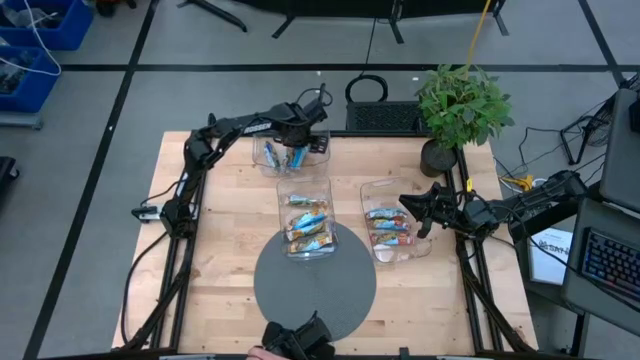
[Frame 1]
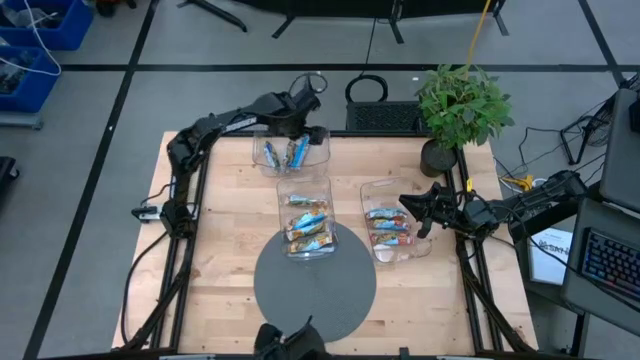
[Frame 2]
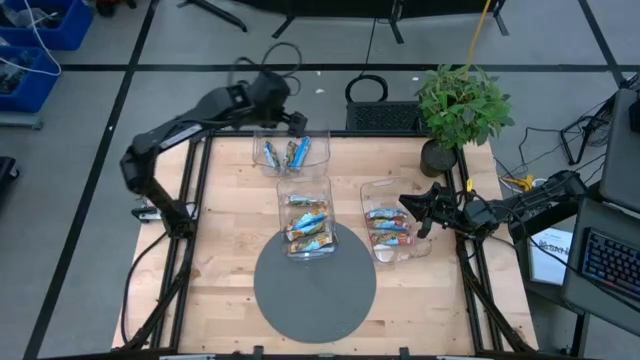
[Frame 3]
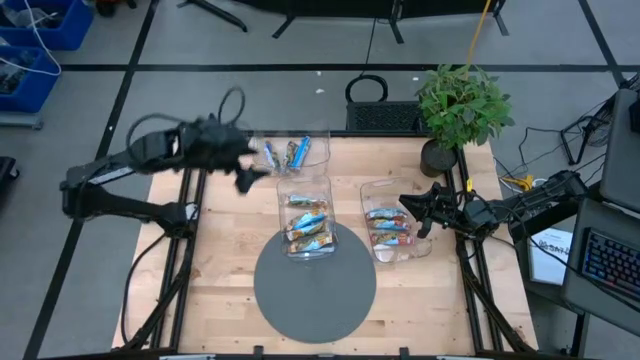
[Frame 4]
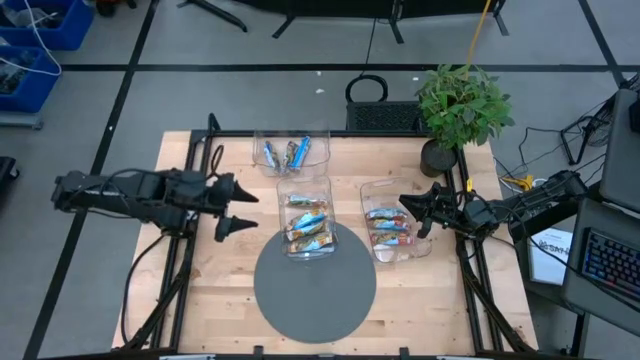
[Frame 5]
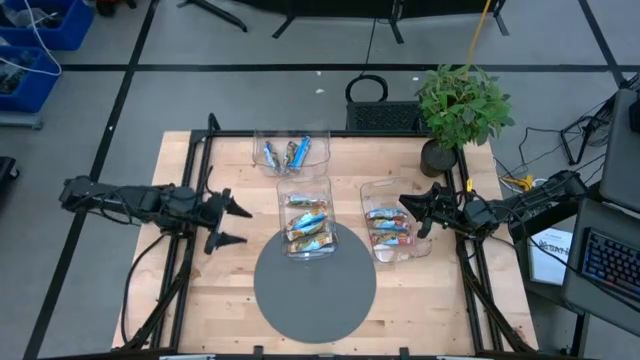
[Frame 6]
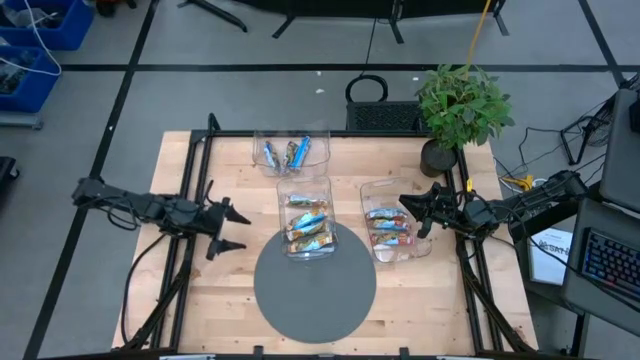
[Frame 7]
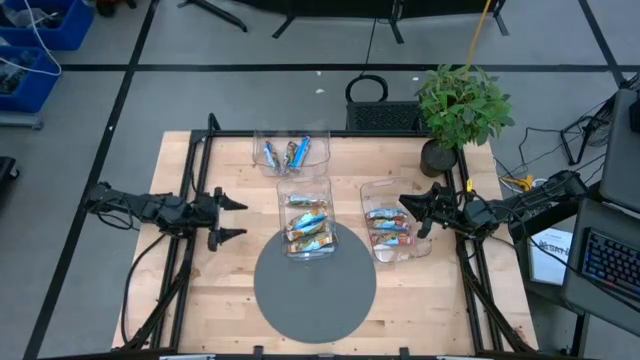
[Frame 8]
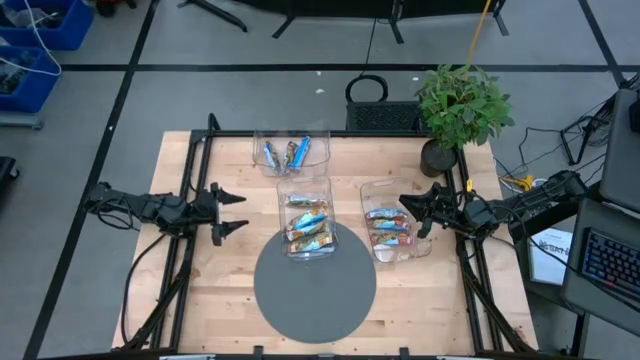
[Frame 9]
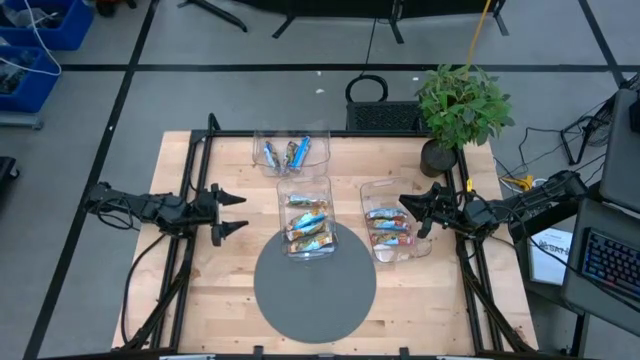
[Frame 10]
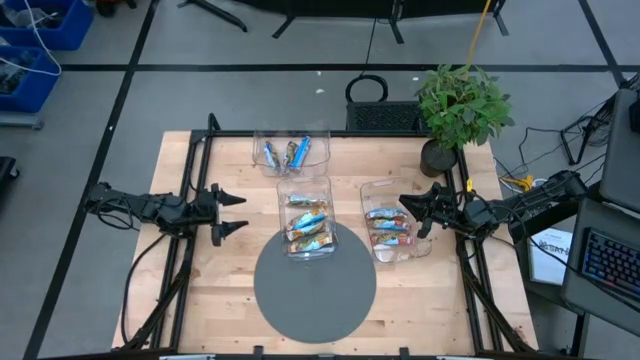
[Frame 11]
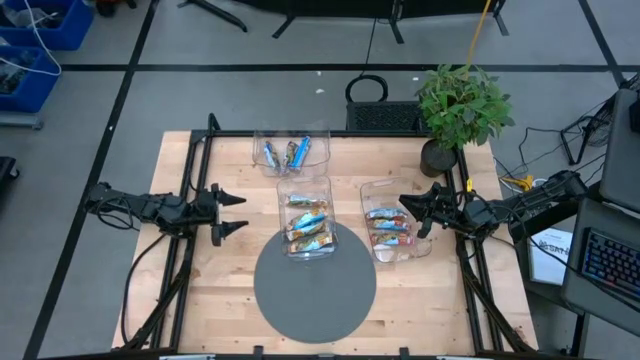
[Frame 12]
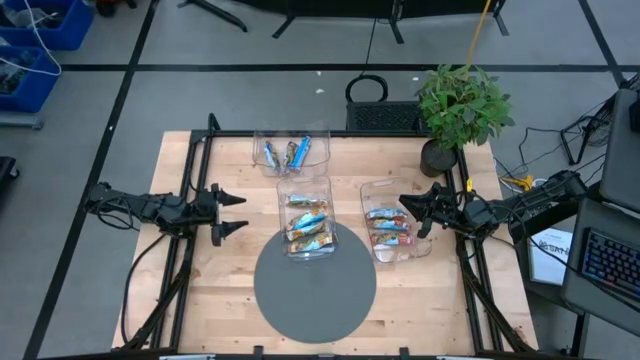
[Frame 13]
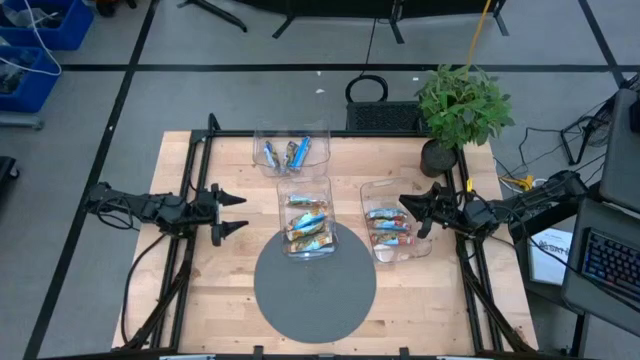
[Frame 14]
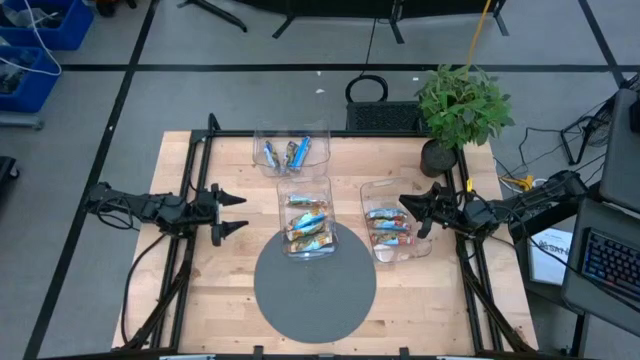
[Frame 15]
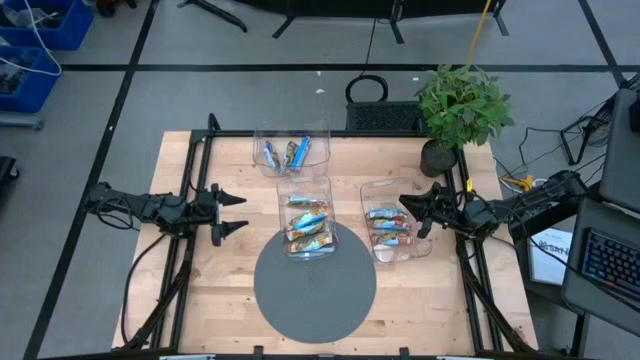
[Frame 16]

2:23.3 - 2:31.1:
Task: Pick and place Granola Bars by type
Return to Home Position

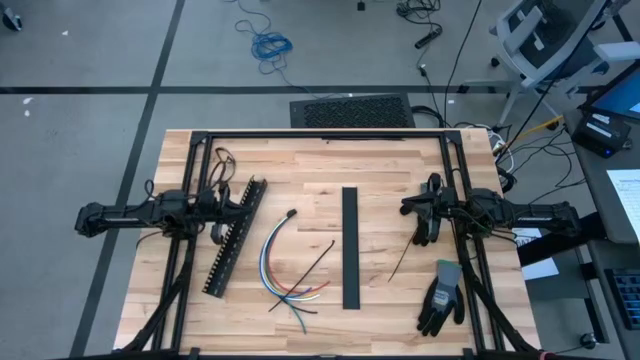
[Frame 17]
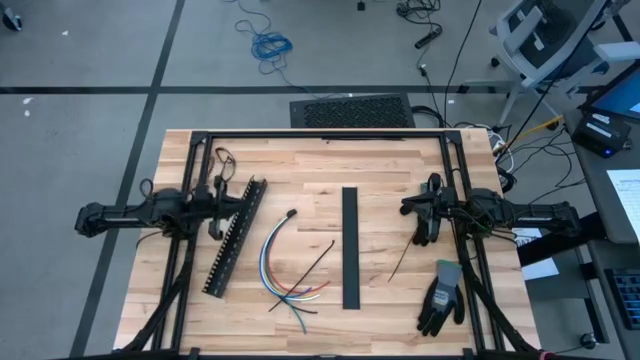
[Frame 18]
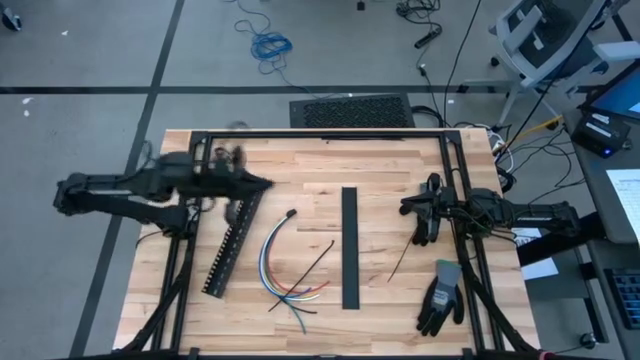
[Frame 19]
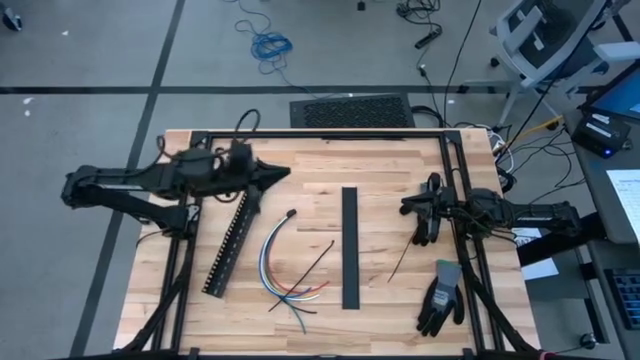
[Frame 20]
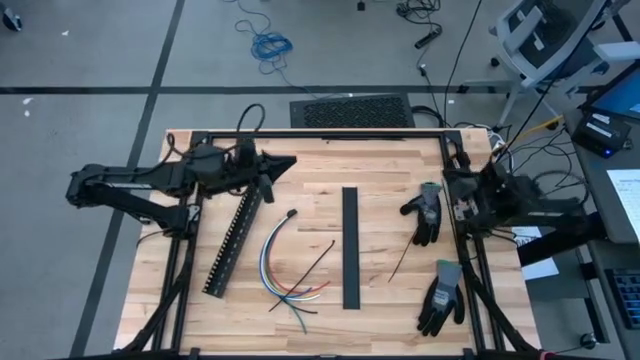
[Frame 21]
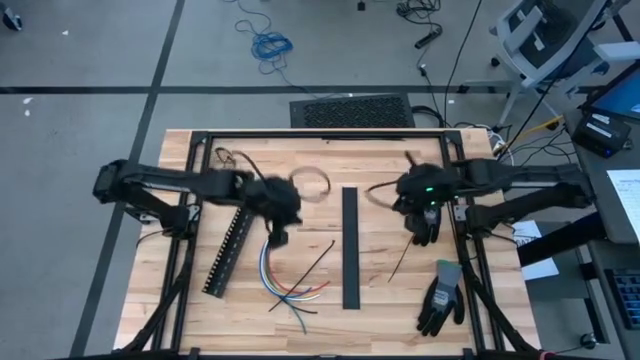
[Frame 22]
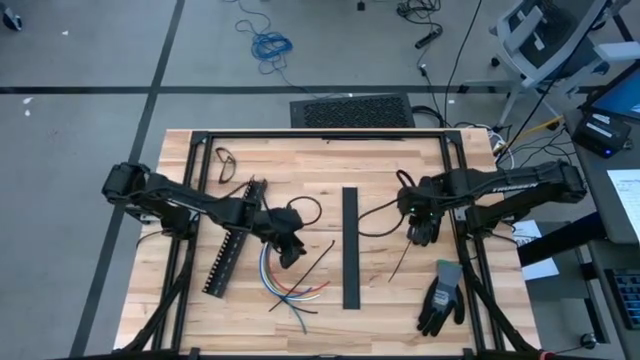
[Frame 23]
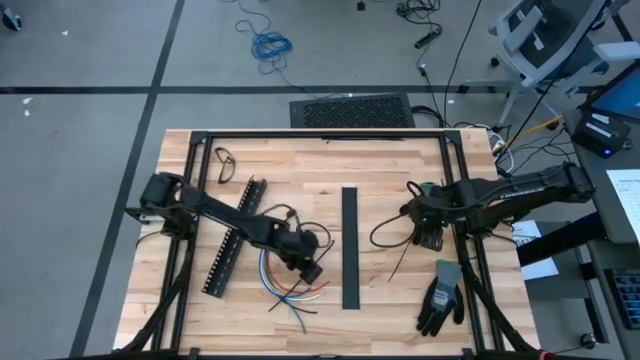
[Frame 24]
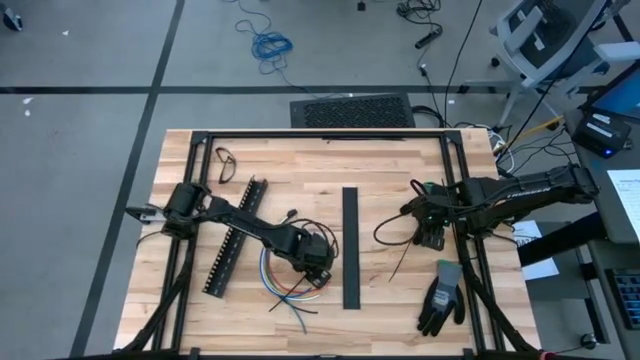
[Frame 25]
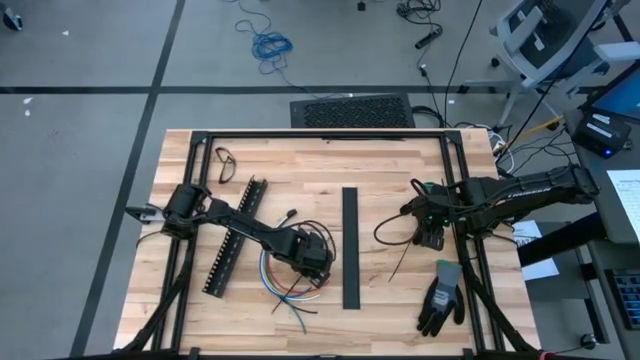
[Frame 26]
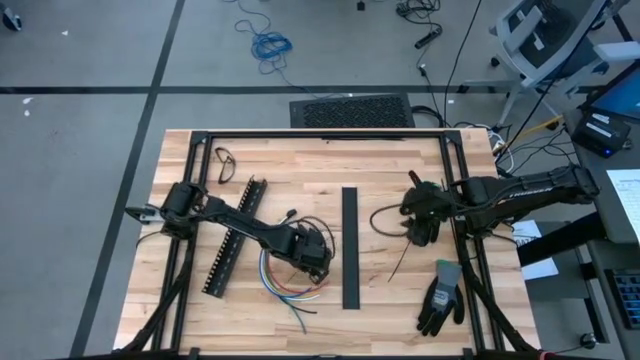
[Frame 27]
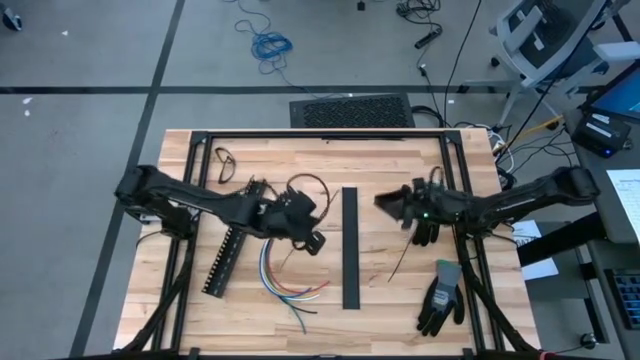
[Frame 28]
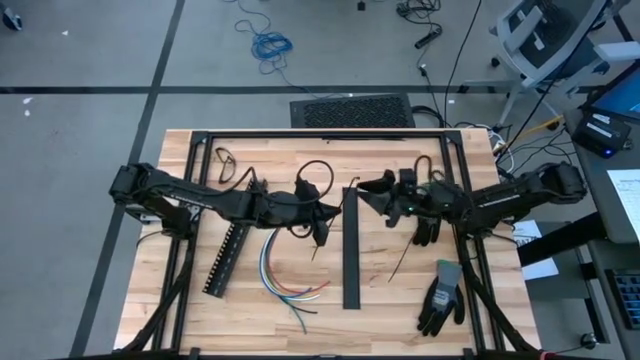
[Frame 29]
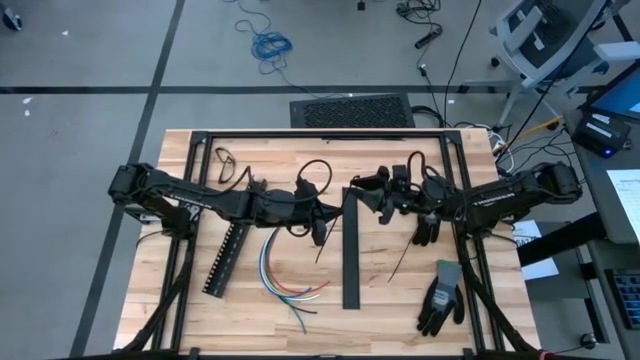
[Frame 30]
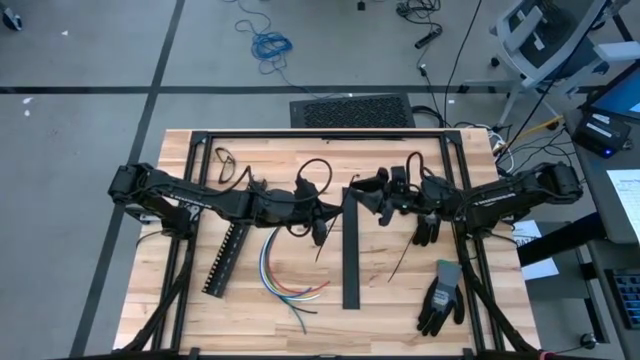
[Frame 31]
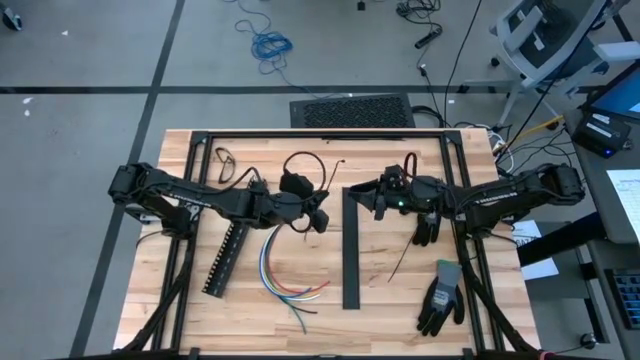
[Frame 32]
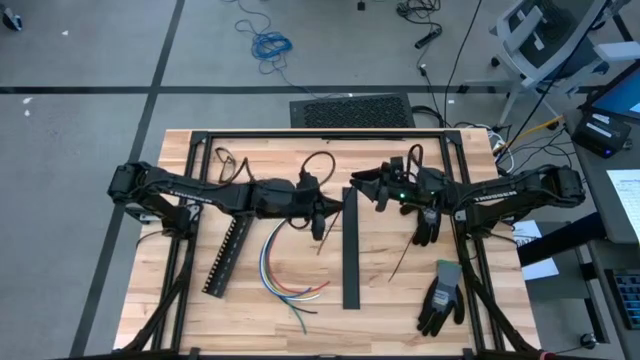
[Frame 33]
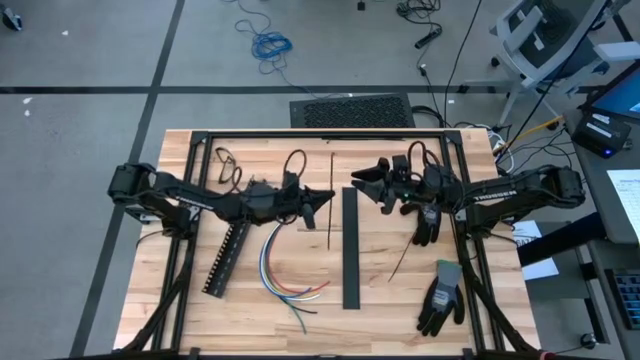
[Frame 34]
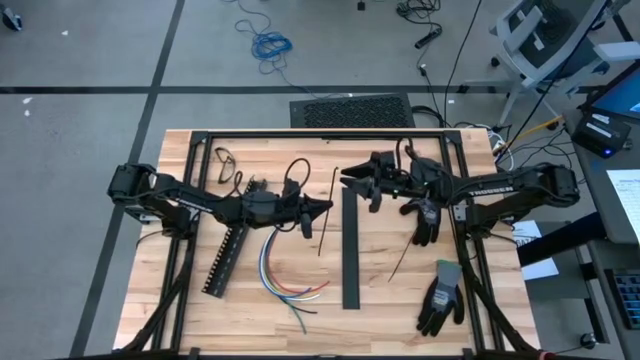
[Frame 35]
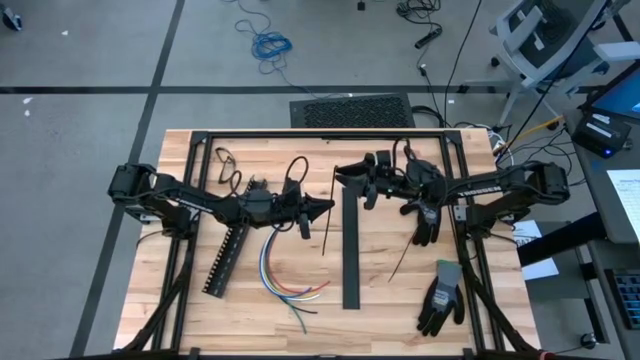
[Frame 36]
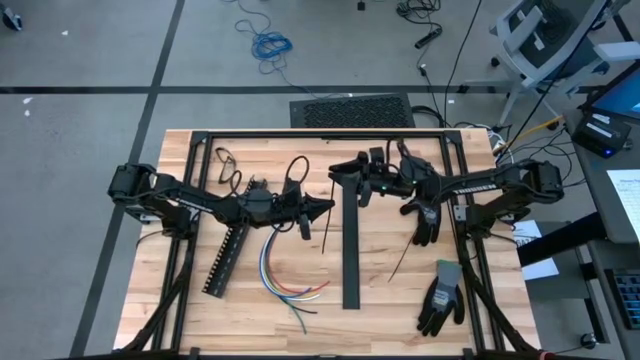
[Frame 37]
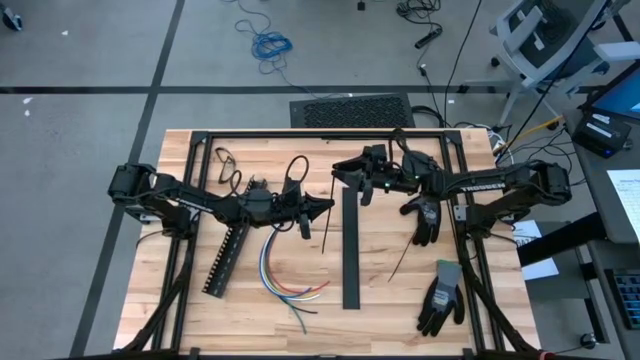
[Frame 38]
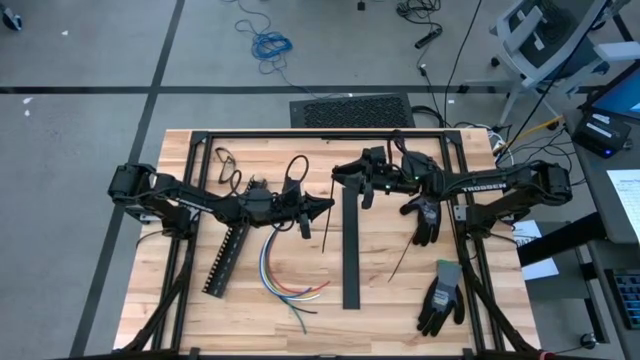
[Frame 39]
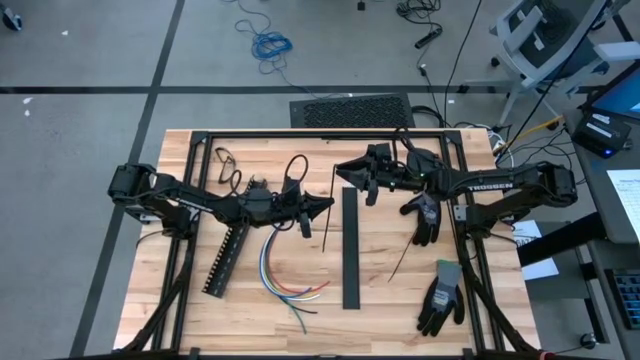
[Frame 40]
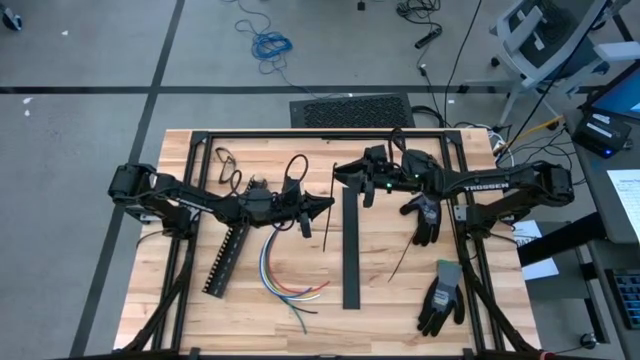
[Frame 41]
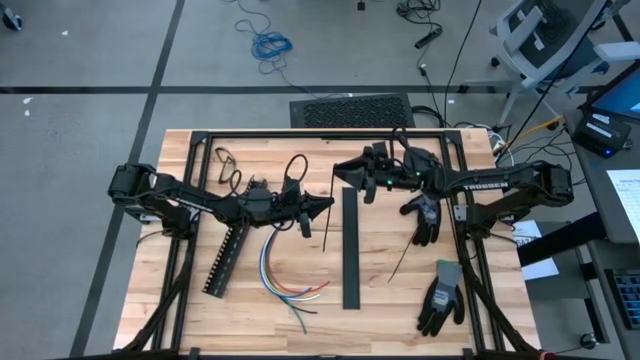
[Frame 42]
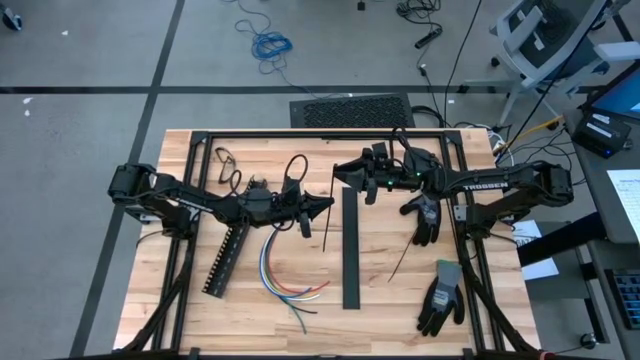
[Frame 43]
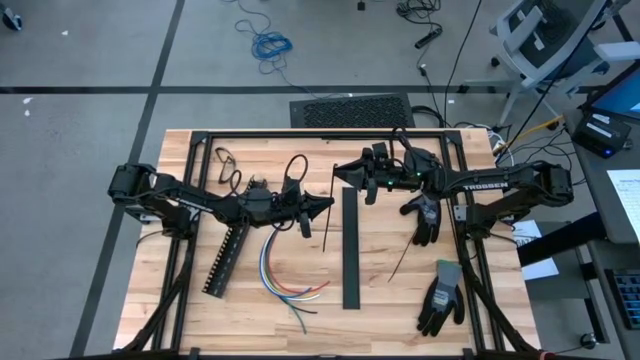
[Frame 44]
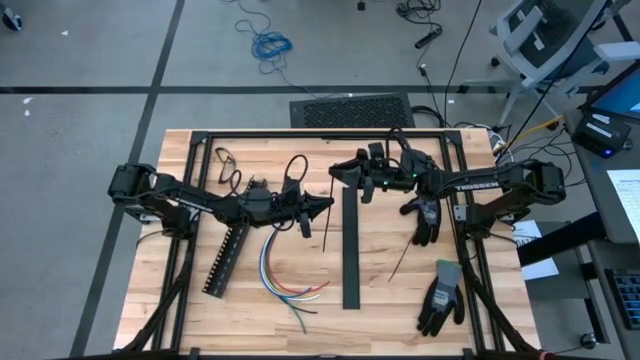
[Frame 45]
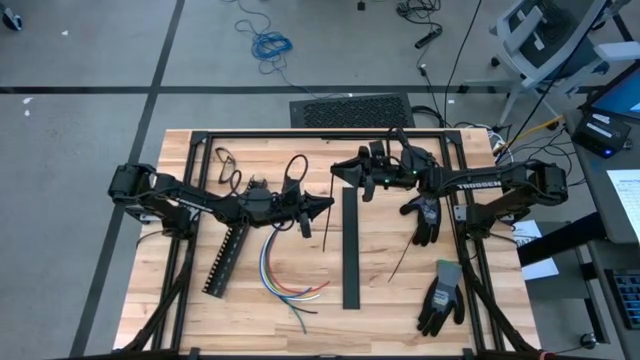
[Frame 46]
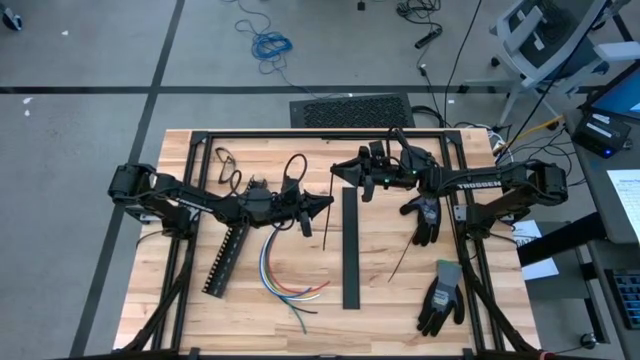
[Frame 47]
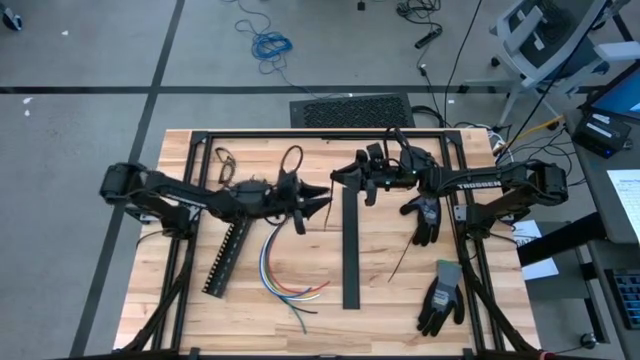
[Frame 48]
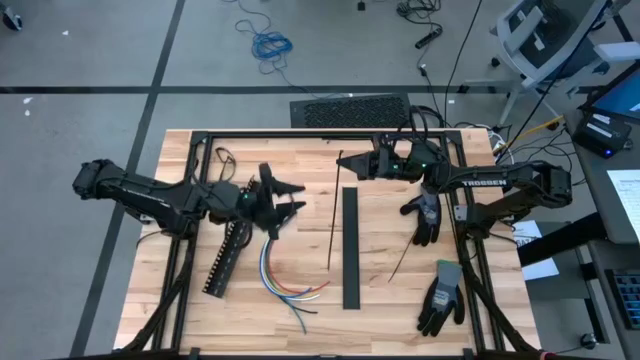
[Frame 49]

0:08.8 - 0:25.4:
Task: Ziptie cables
Prepare the zip tie
